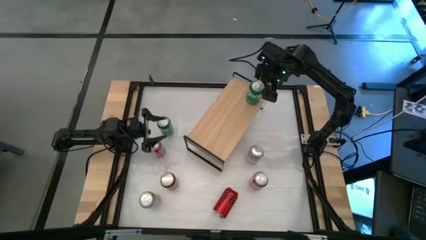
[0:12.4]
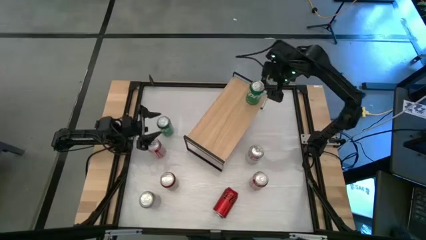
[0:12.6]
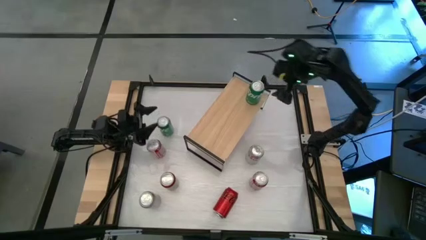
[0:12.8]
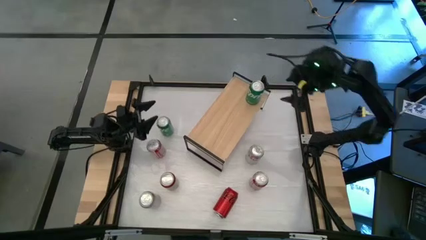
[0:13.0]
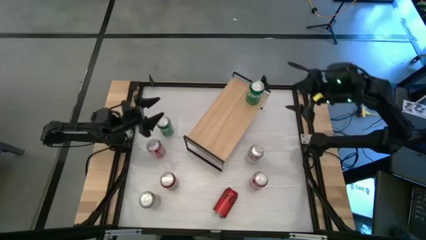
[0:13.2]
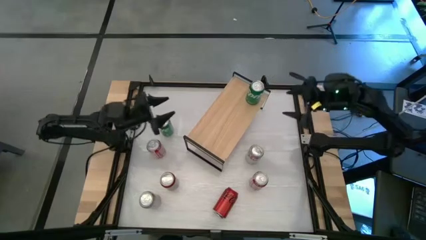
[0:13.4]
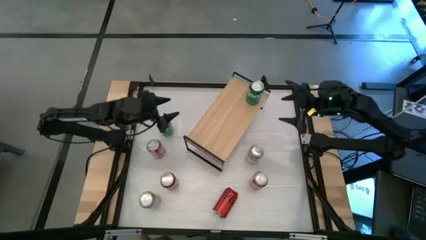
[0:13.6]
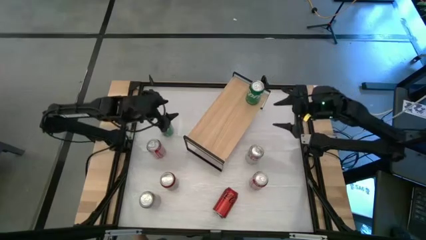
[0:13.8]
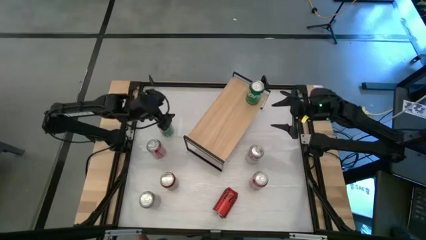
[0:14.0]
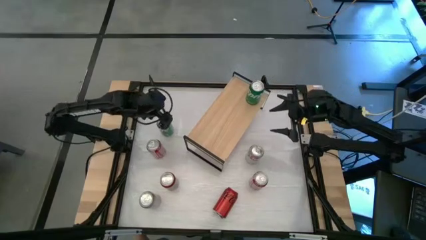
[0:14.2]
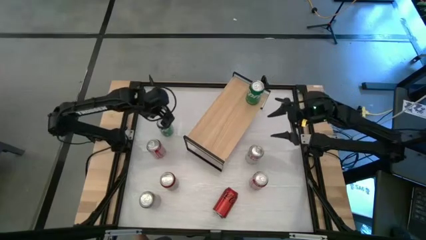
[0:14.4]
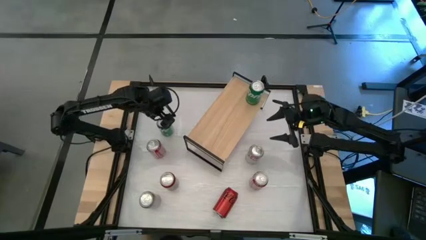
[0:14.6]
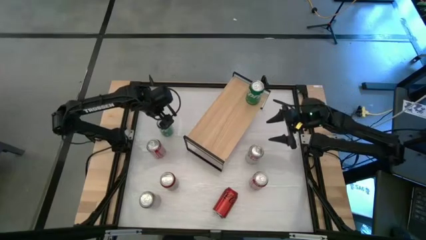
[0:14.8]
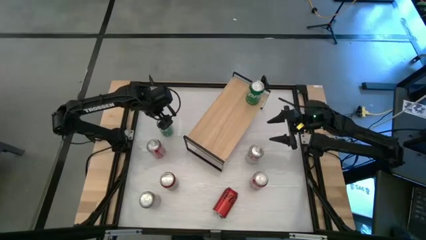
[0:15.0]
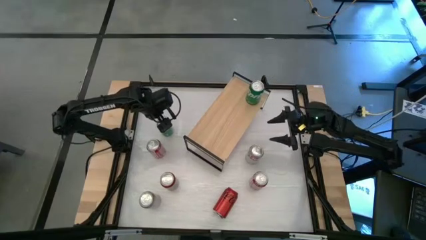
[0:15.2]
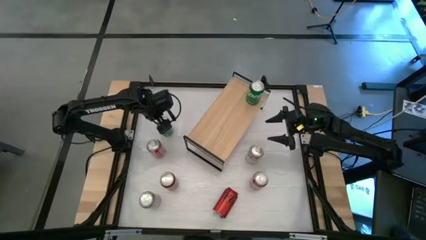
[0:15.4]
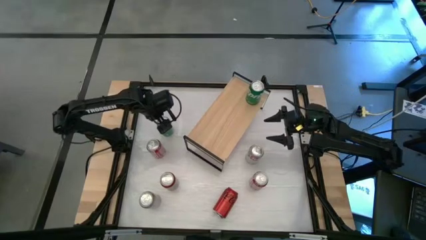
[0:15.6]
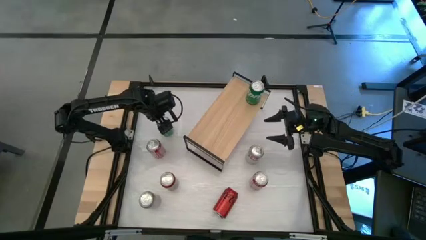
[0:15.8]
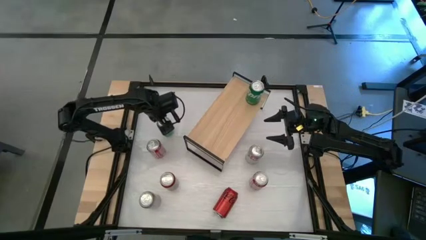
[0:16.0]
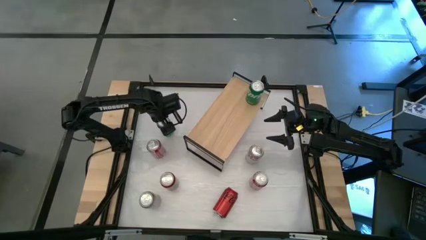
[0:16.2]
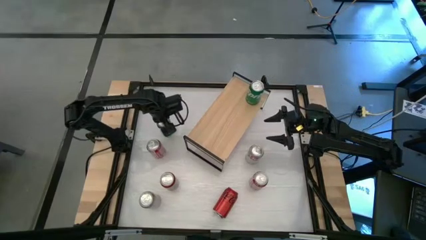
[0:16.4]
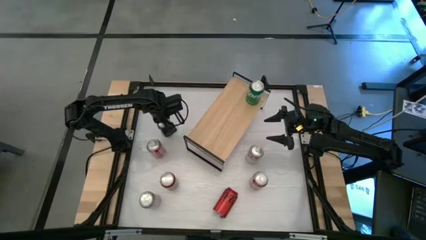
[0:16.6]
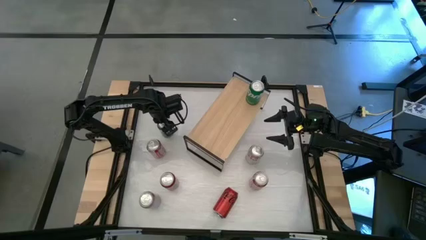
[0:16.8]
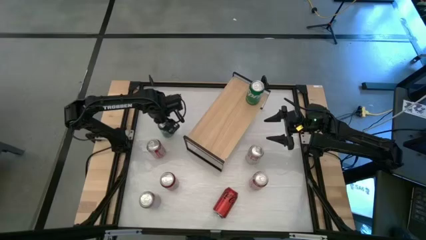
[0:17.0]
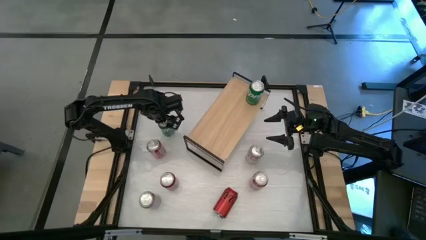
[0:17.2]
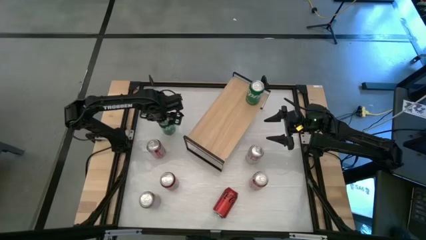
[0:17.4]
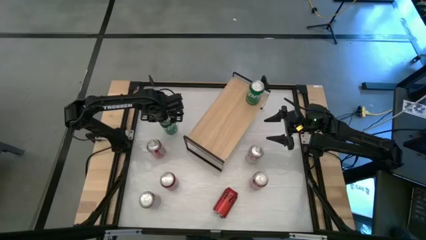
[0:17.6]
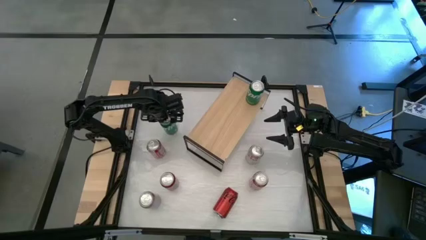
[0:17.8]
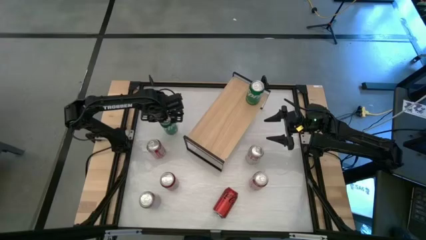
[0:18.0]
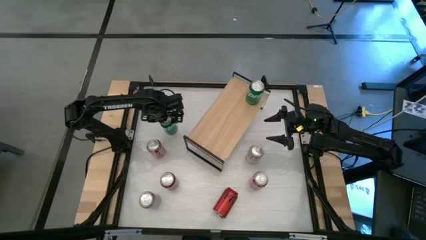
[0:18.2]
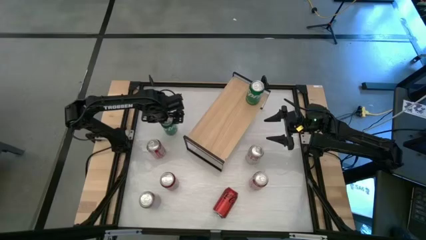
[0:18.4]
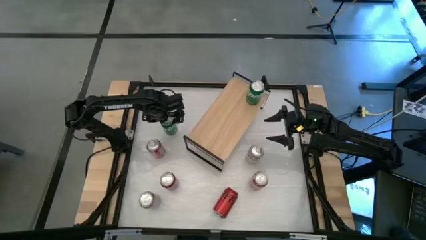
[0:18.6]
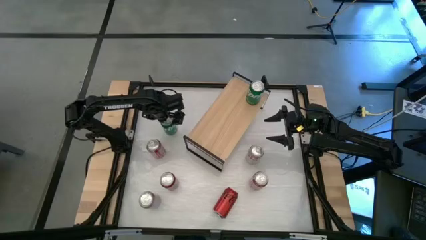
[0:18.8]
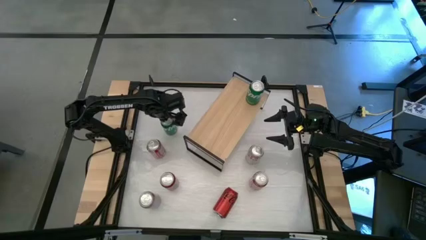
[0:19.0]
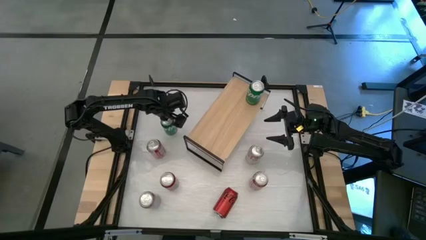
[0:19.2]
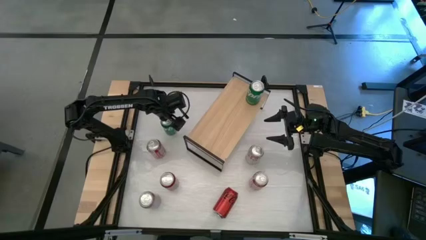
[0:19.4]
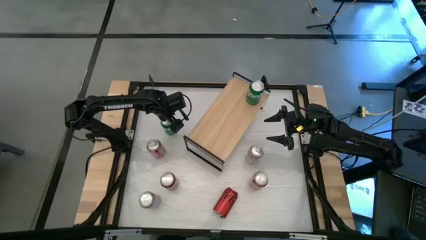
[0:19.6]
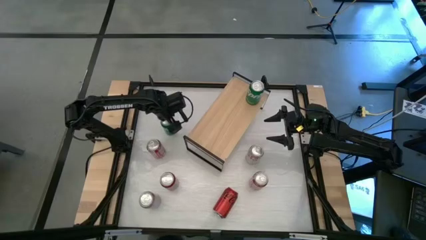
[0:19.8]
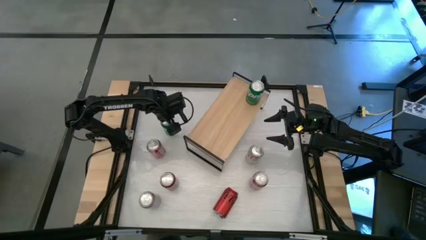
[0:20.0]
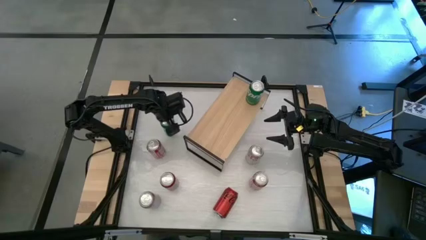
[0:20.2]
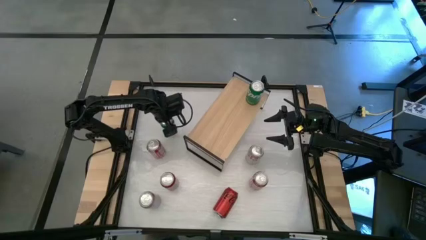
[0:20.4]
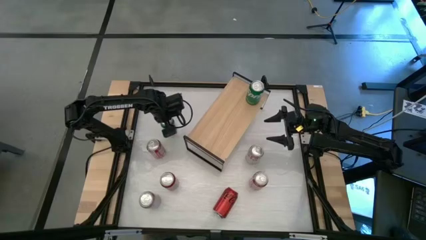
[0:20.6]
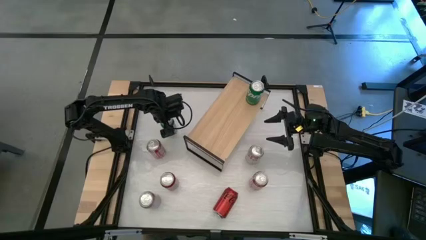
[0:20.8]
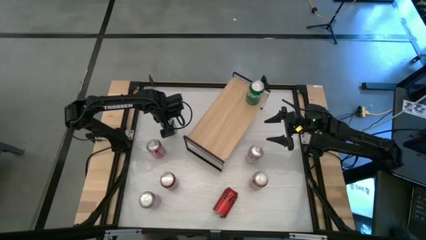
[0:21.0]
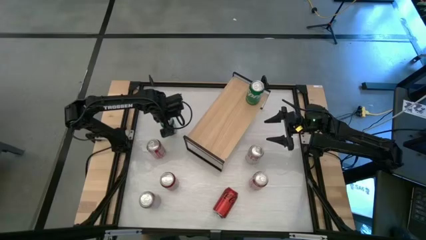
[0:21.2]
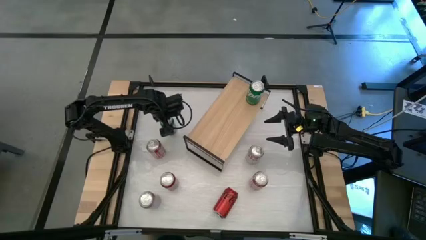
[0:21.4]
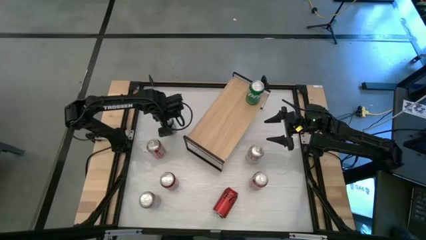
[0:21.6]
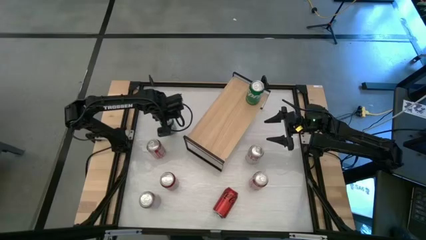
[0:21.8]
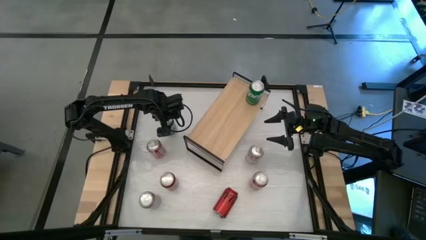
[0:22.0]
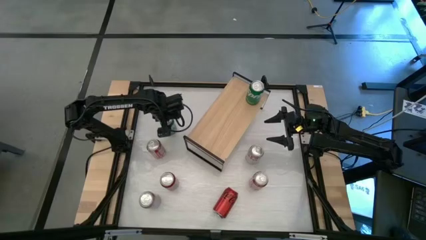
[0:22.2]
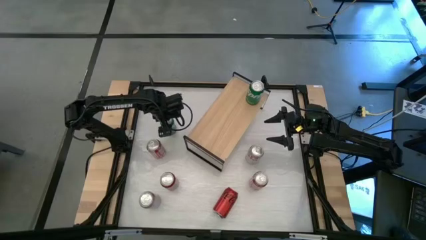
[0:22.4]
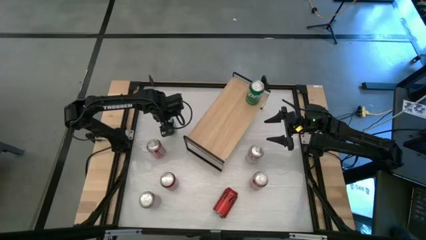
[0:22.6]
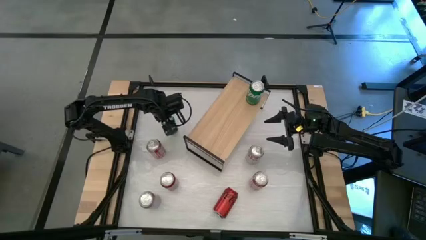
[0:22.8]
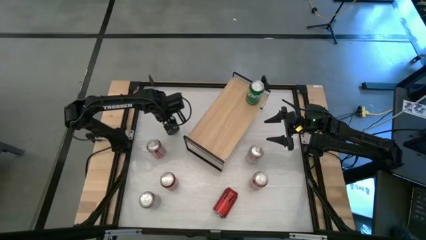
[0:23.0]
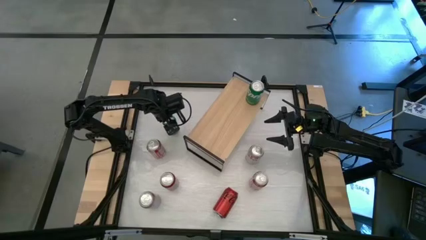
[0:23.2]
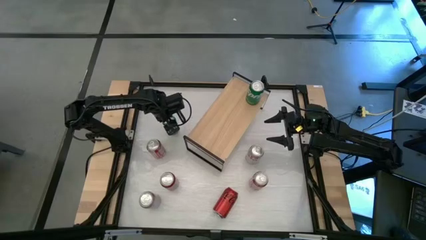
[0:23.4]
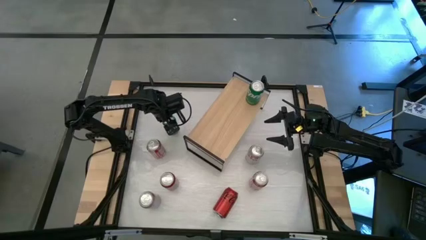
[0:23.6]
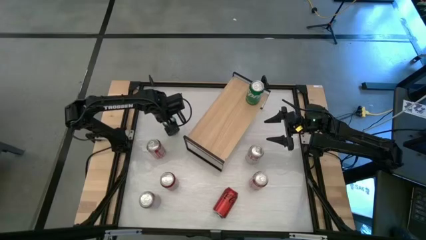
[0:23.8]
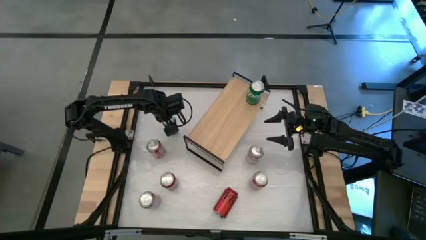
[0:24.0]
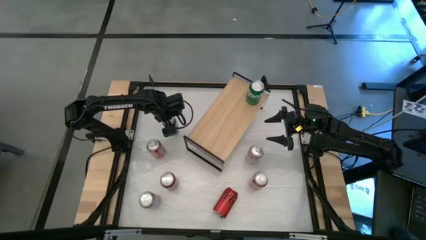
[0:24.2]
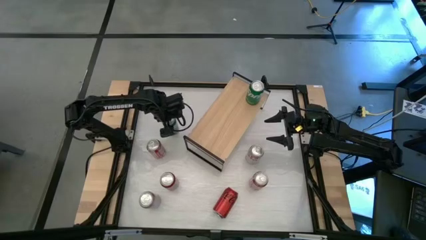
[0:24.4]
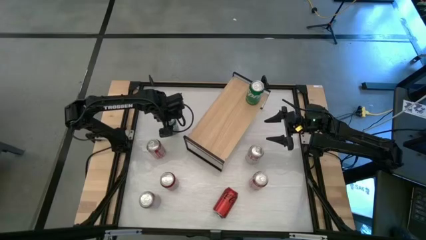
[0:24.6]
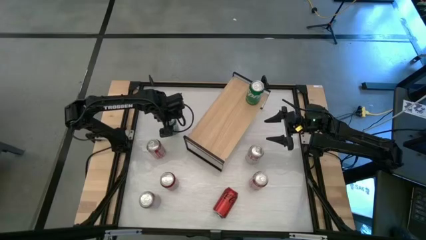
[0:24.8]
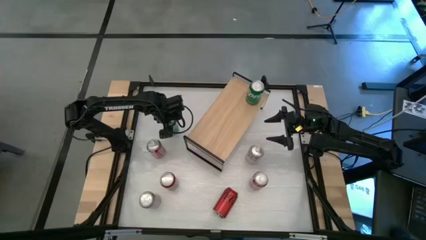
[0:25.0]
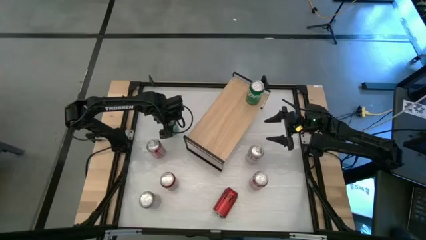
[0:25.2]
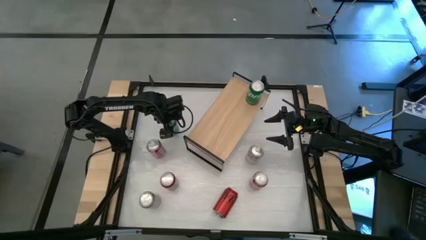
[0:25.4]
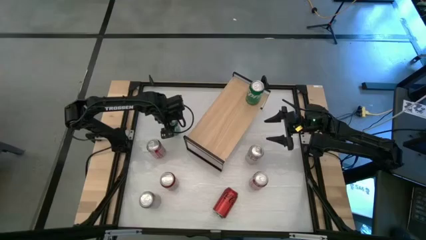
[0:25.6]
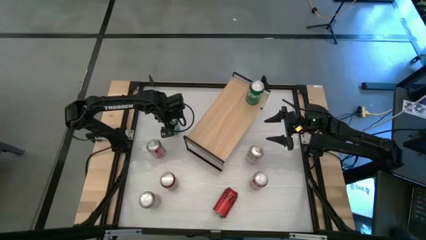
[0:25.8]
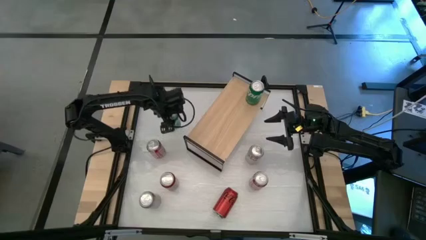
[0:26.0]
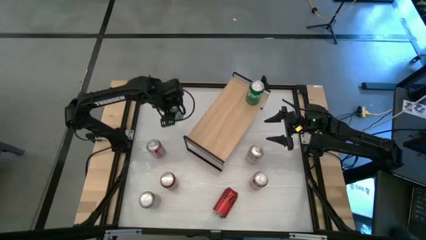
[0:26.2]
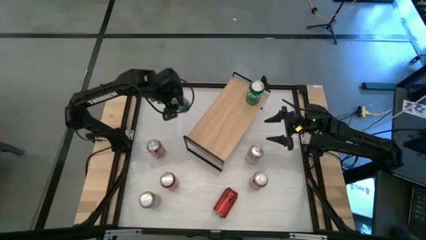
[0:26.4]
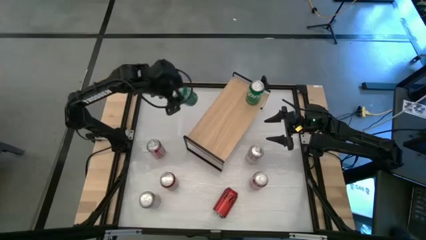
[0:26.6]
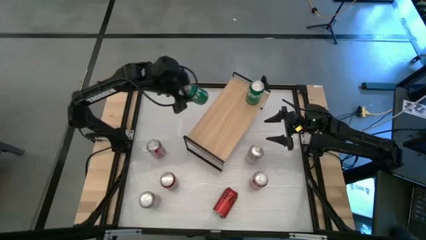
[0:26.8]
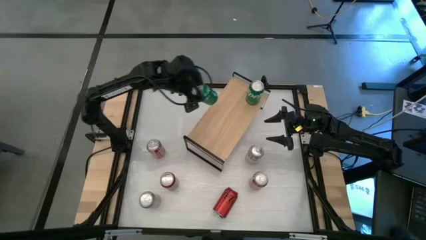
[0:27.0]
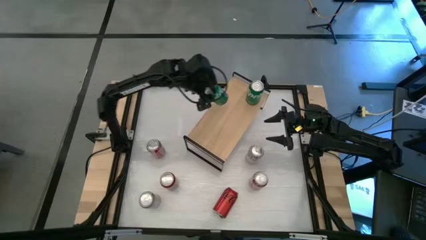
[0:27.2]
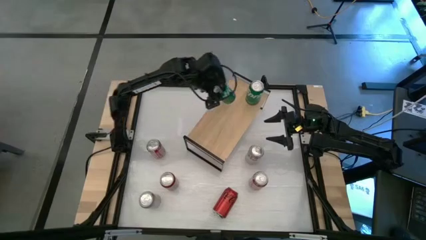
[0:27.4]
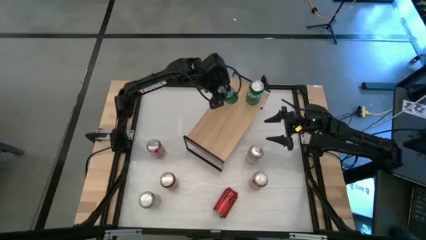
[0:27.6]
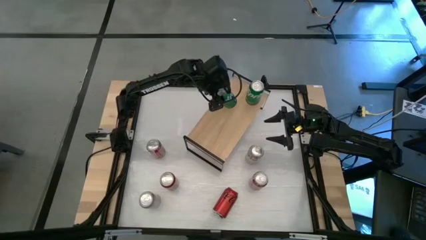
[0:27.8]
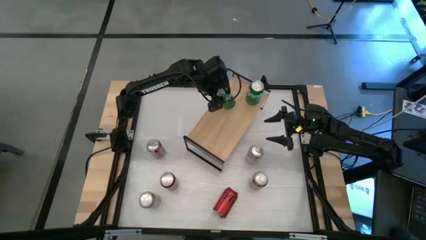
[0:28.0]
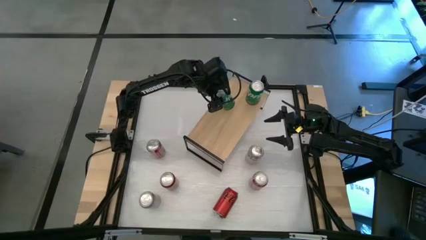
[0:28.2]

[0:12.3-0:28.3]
Task: Place canned beverage on shelf
Put the green soda can on the shelf aligned with the other green soda can
